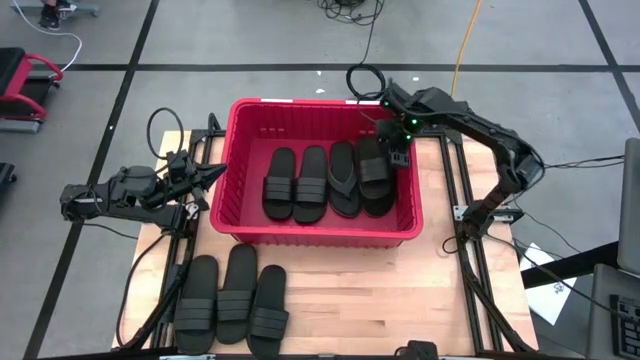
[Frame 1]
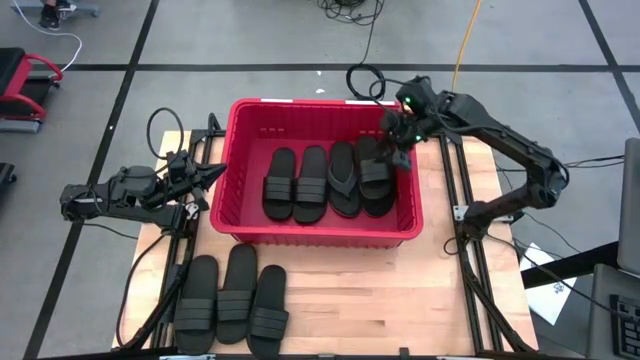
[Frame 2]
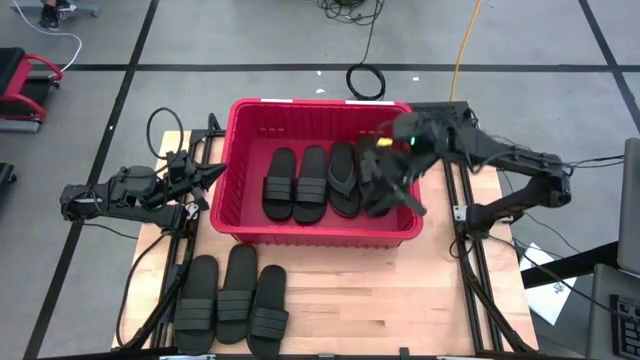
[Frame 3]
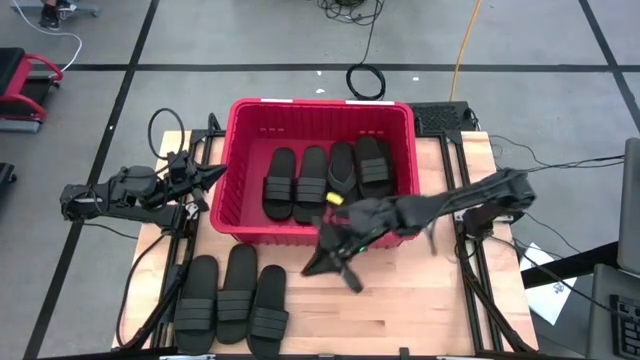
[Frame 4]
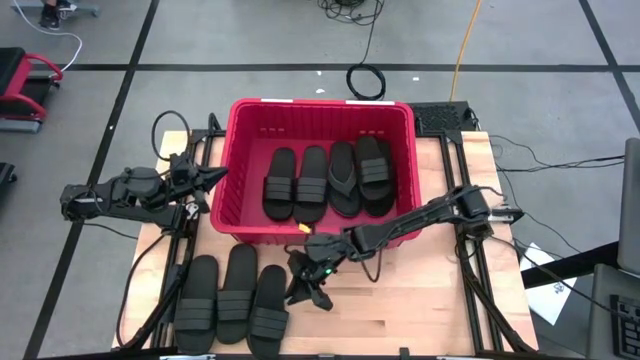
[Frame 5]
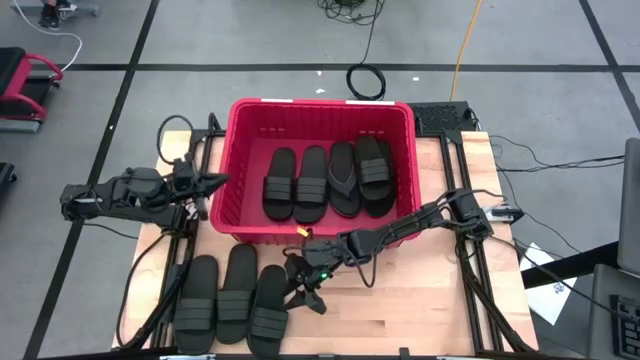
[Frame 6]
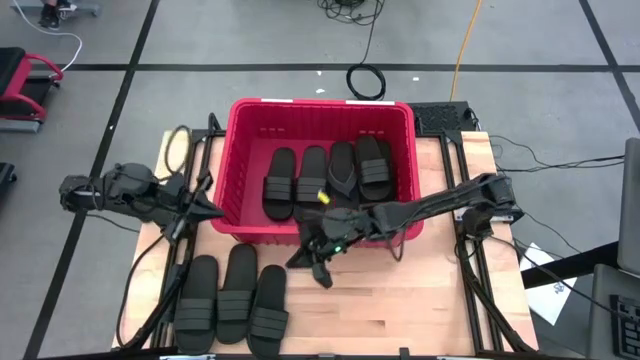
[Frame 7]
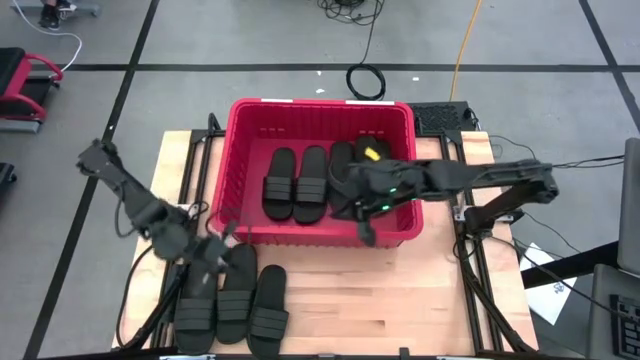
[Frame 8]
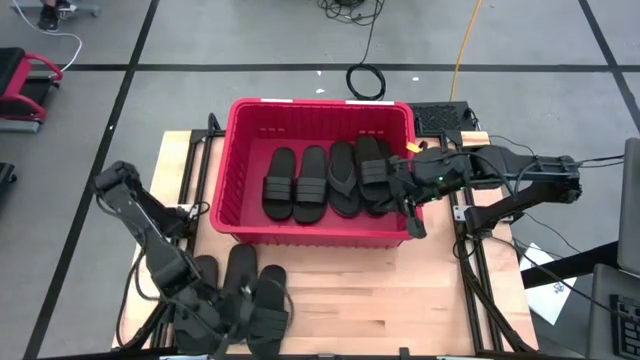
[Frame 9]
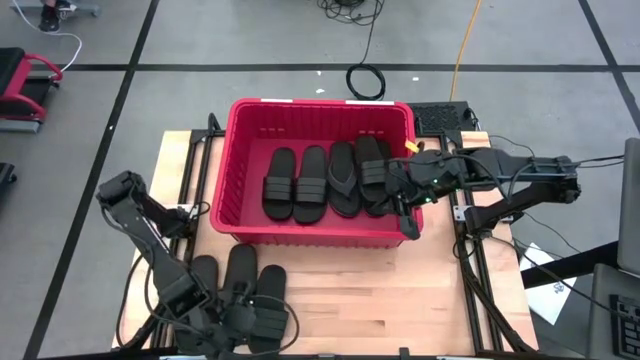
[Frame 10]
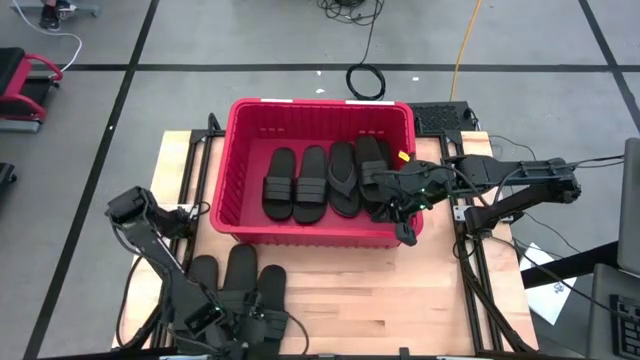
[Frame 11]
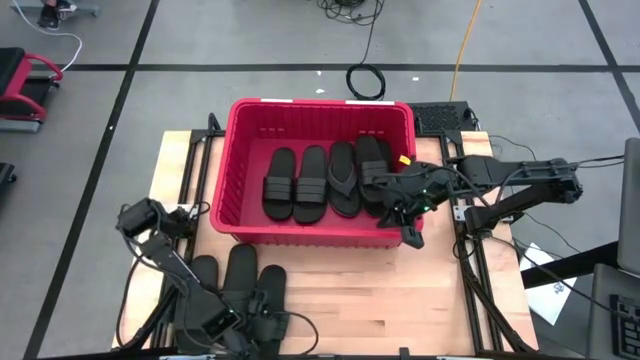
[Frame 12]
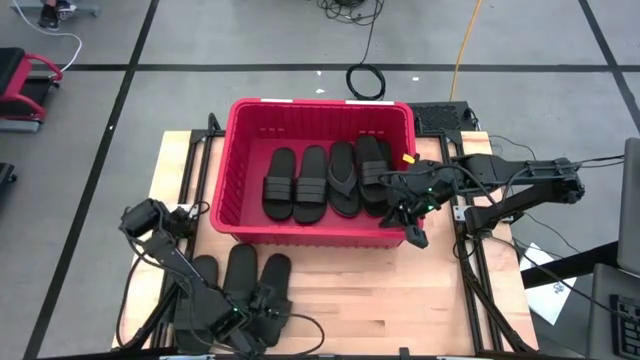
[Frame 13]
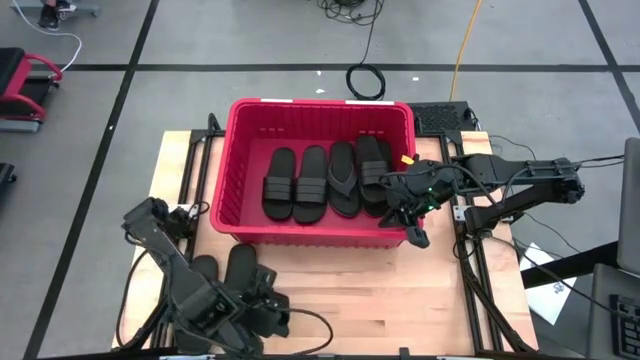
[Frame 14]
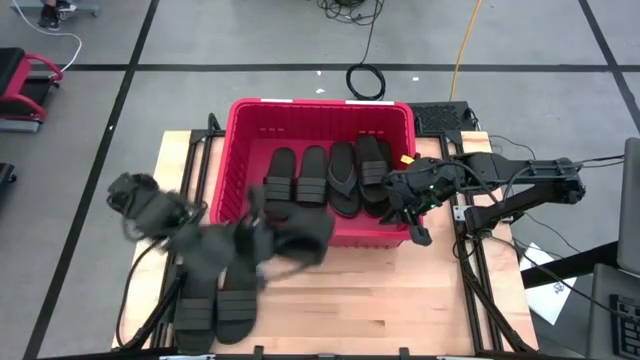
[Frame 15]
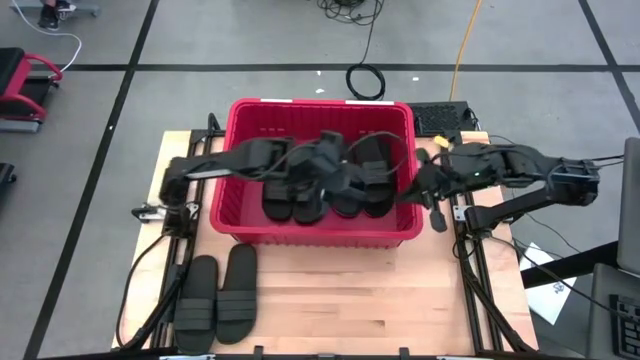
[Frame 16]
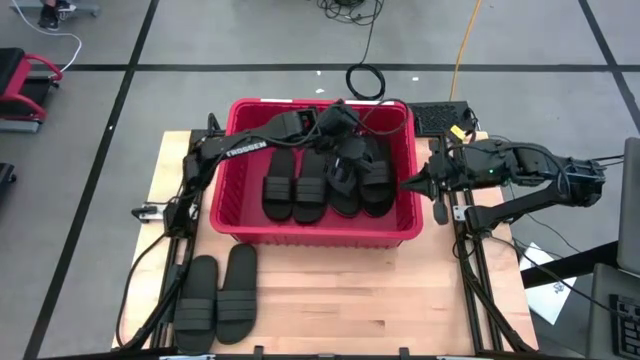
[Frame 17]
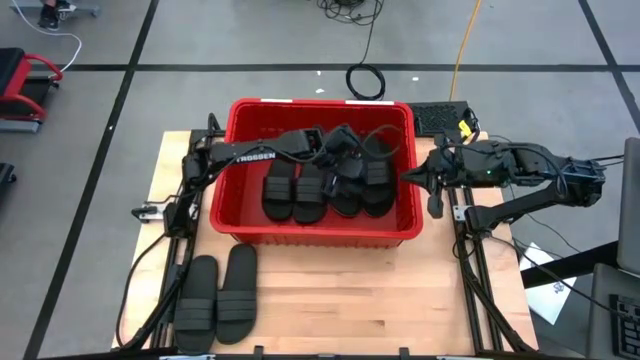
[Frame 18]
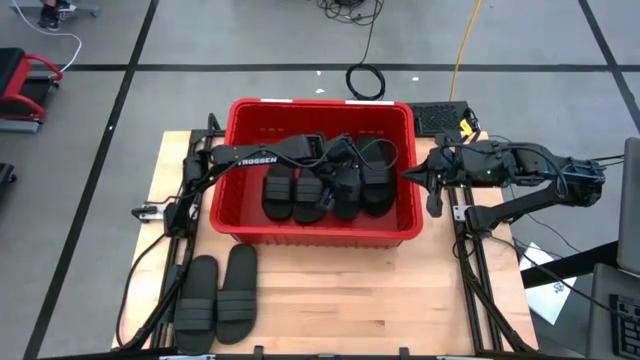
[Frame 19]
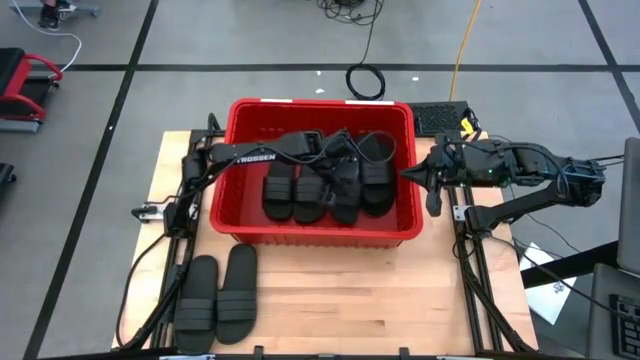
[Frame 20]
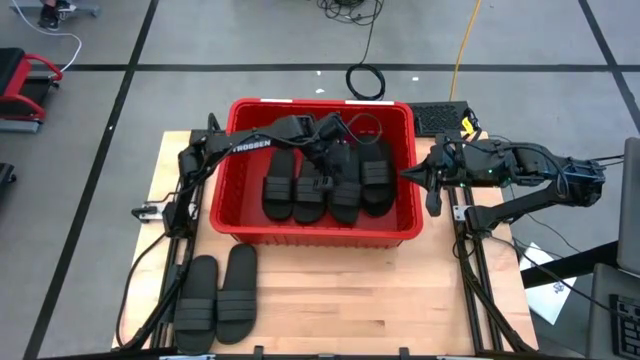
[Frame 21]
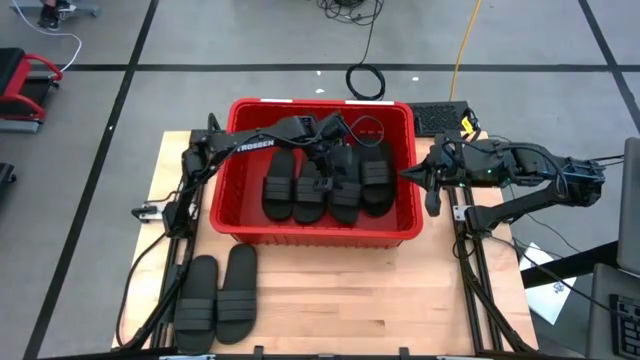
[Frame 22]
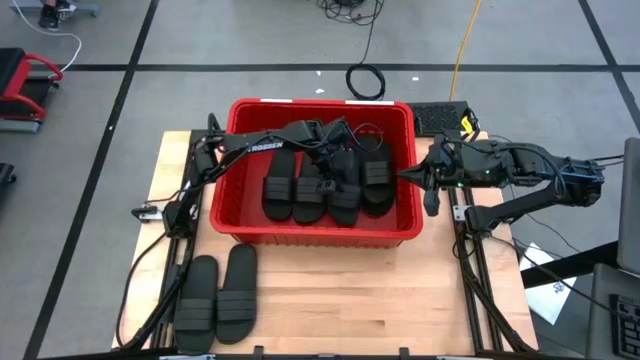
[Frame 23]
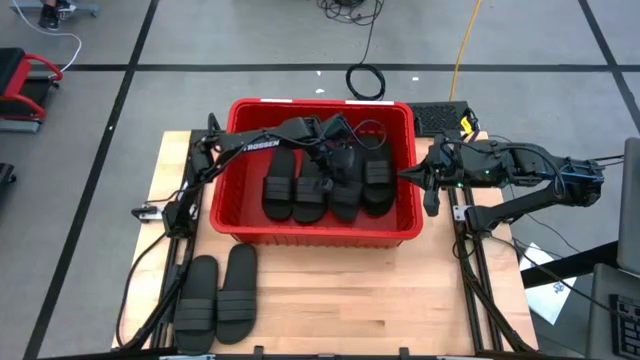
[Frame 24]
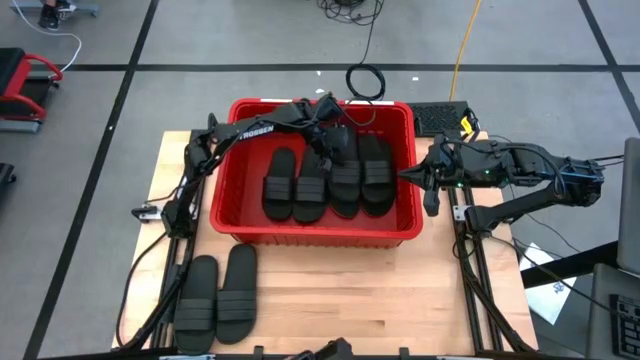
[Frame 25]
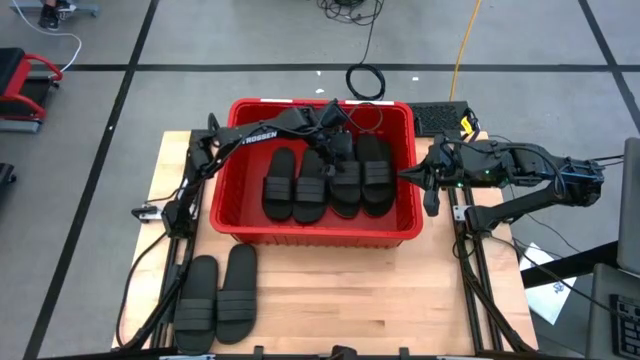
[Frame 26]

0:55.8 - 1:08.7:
Task: Pick and place slides into bin
Put the slide into the red bin

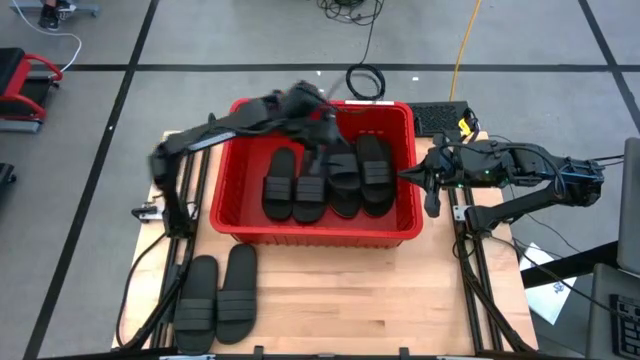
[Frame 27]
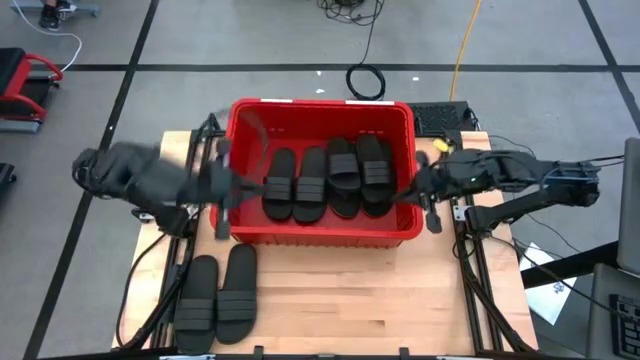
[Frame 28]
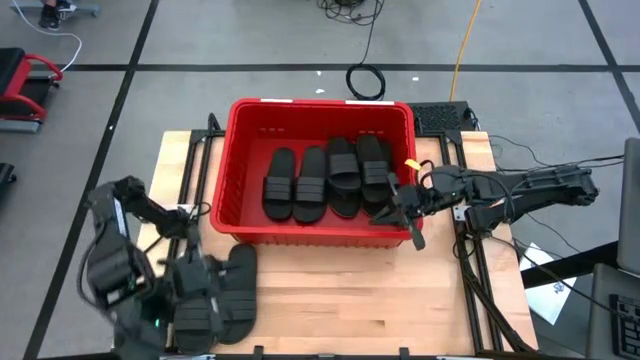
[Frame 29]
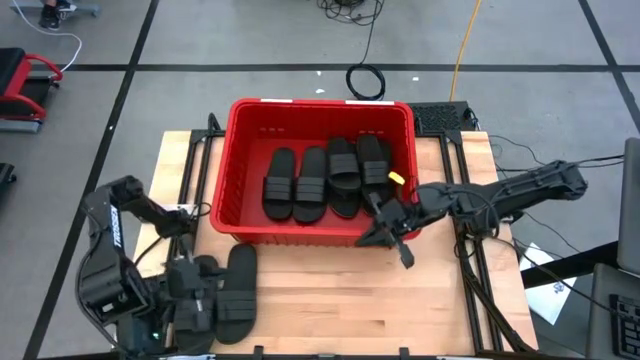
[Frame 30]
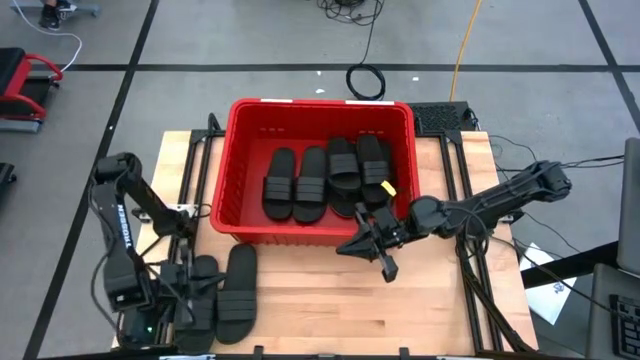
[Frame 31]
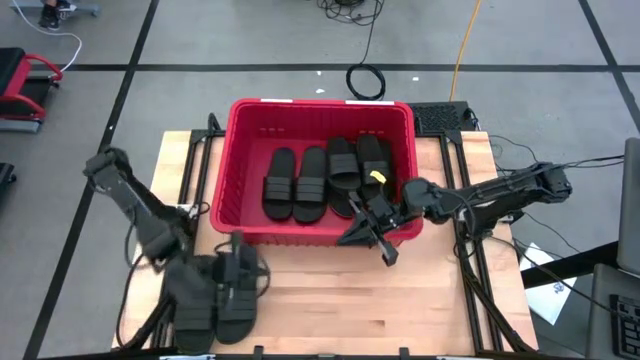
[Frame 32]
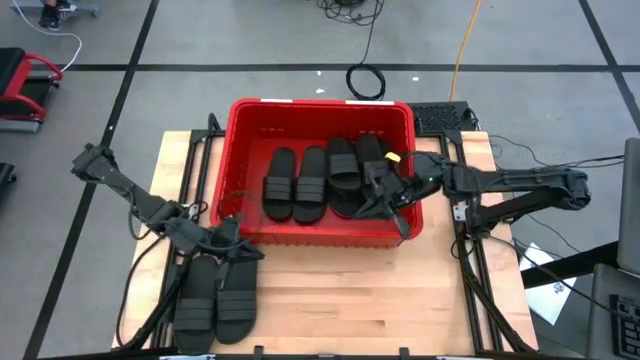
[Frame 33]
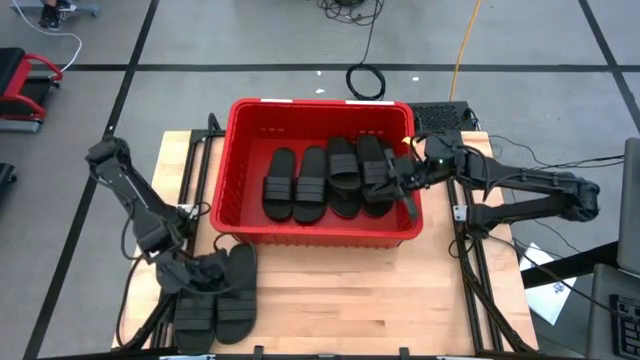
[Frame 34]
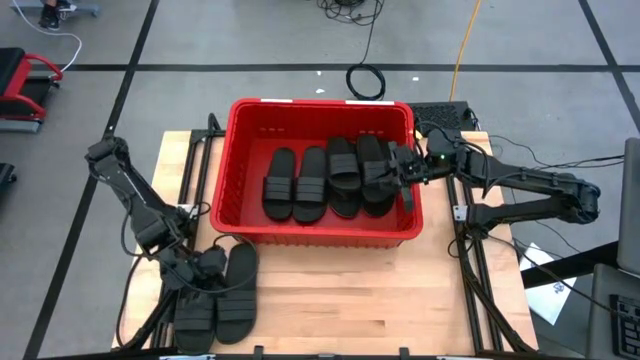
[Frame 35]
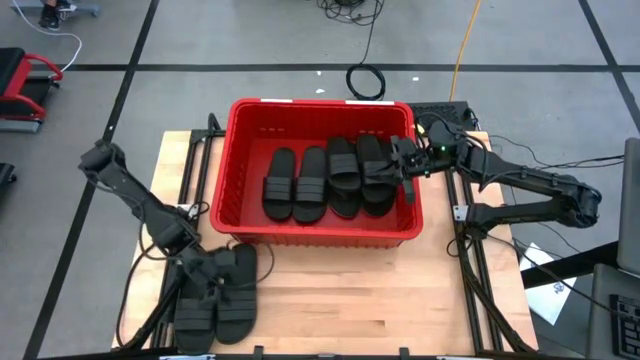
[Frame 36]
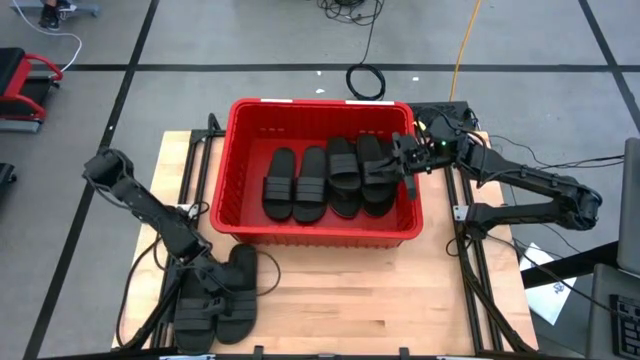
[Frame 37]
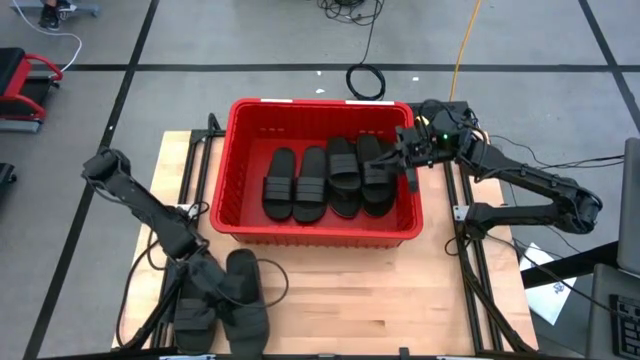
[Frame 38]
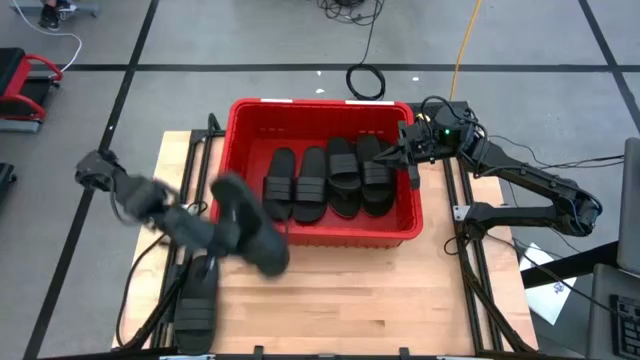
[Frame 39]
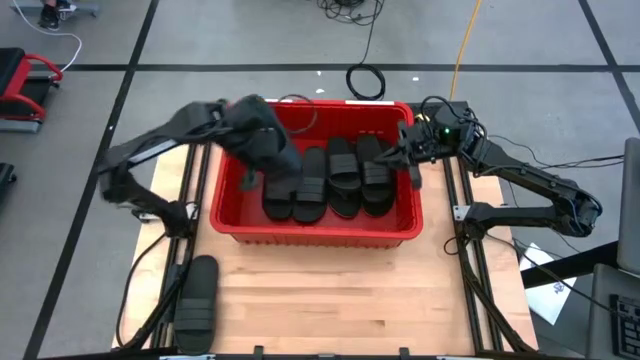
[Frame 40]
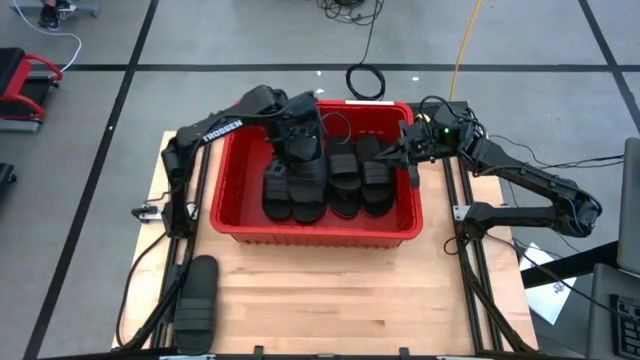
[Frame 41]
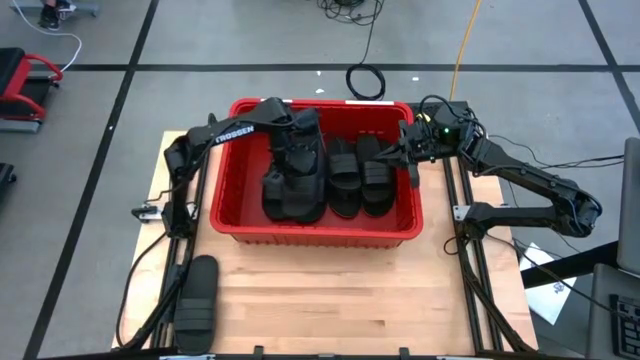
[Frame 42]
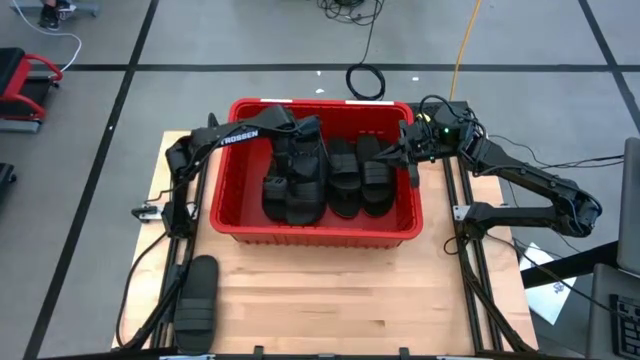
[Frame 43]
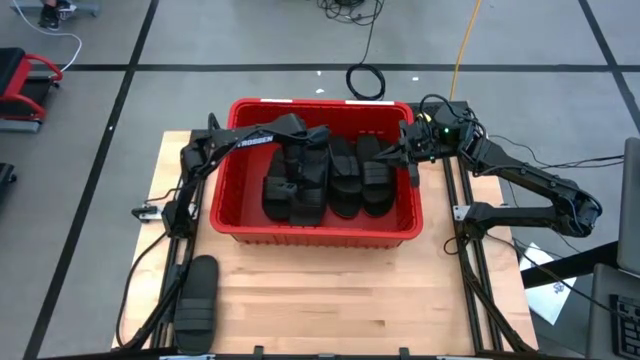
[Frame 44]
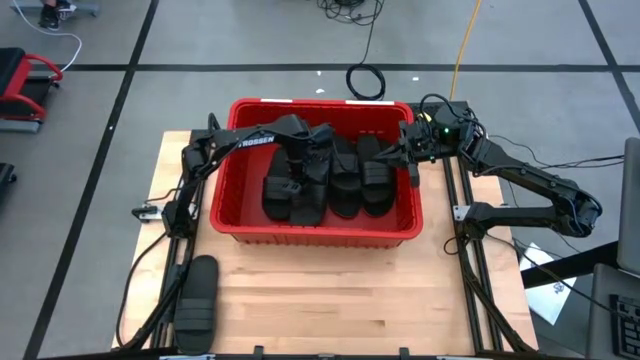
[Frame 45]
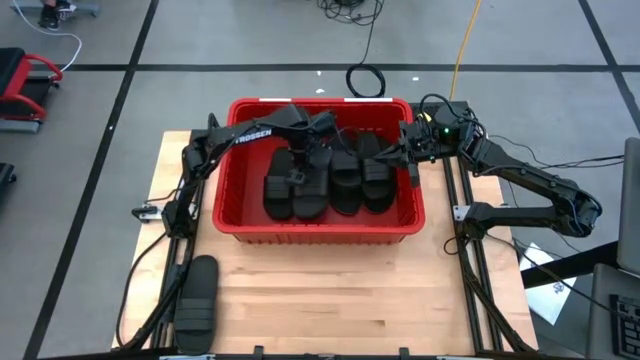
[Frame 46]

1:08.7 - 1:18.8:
Put the slide into the red bin
